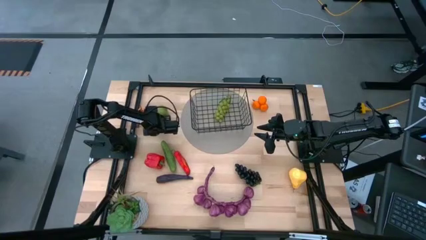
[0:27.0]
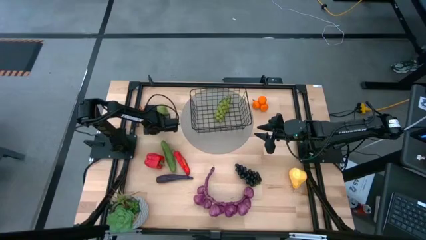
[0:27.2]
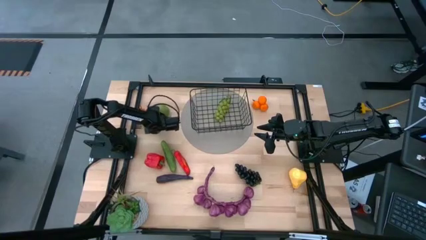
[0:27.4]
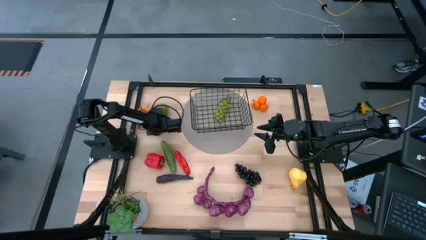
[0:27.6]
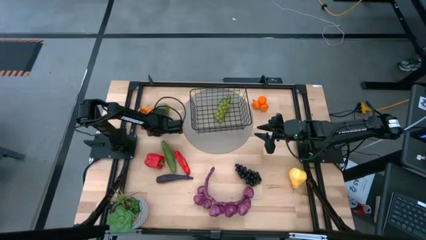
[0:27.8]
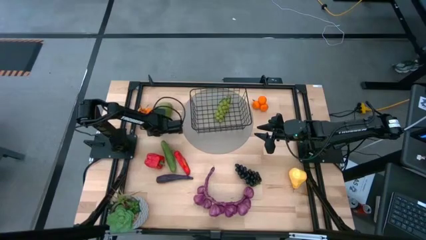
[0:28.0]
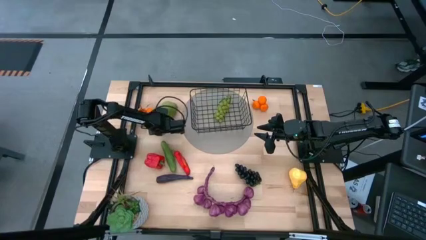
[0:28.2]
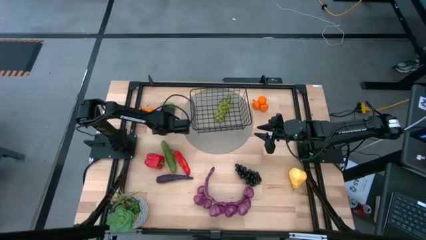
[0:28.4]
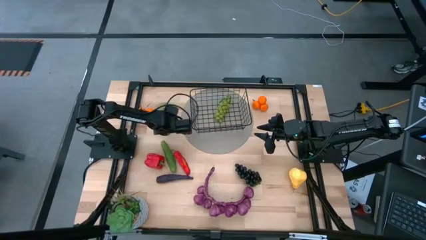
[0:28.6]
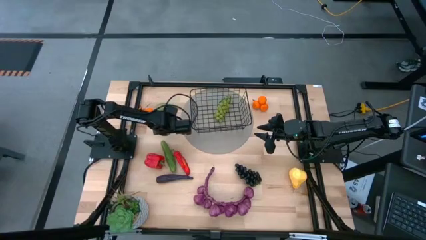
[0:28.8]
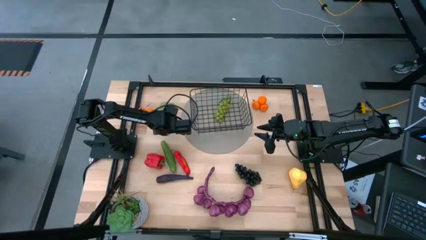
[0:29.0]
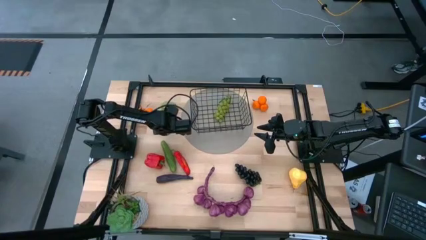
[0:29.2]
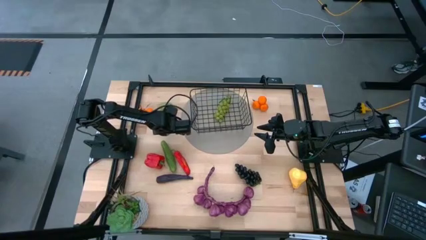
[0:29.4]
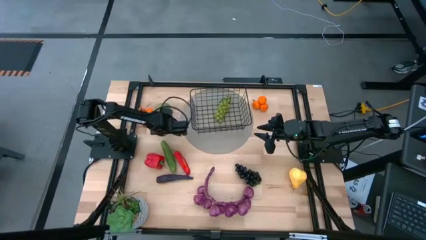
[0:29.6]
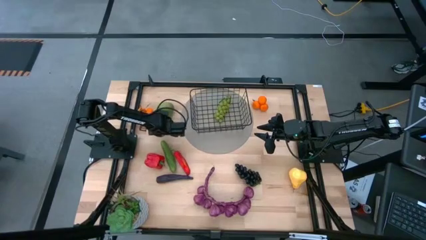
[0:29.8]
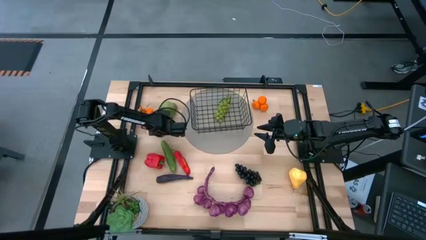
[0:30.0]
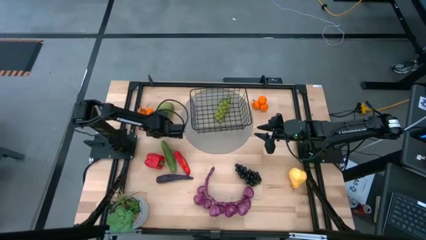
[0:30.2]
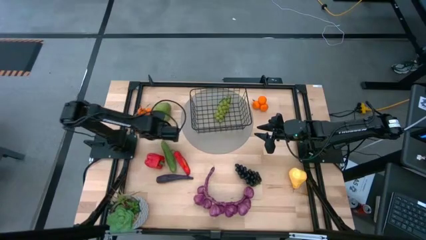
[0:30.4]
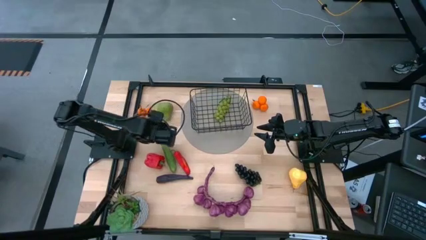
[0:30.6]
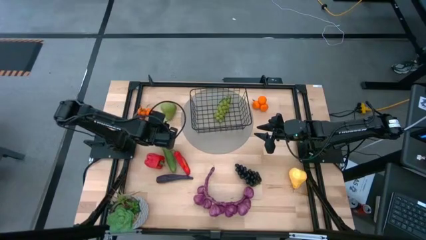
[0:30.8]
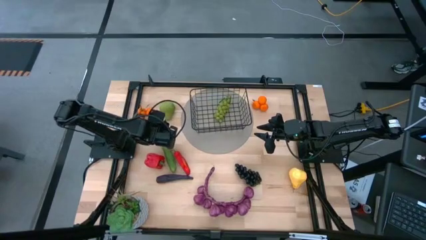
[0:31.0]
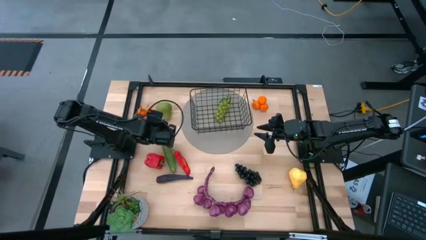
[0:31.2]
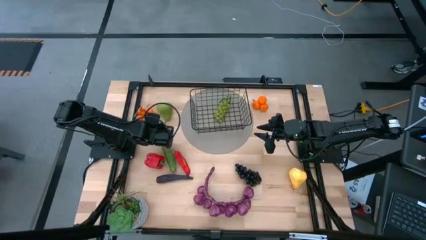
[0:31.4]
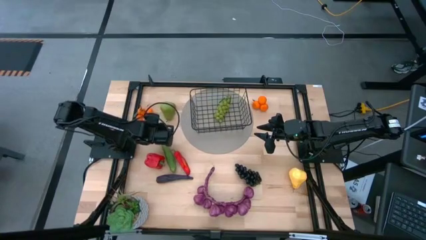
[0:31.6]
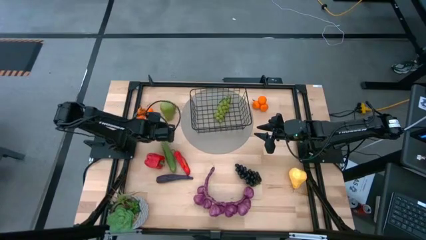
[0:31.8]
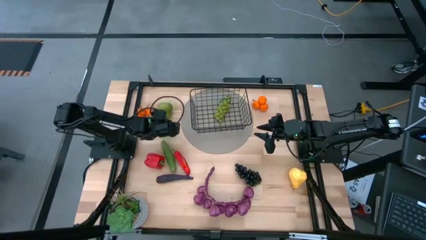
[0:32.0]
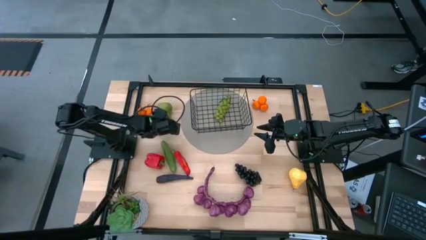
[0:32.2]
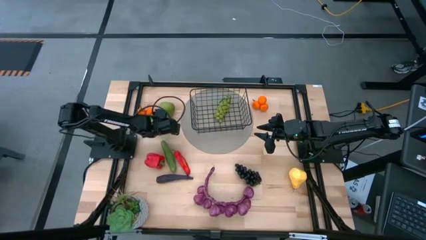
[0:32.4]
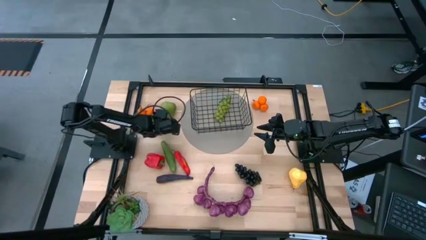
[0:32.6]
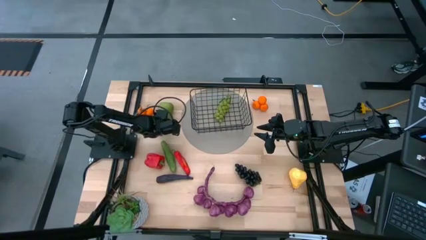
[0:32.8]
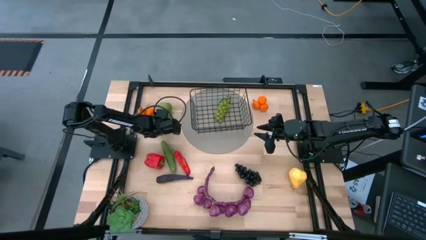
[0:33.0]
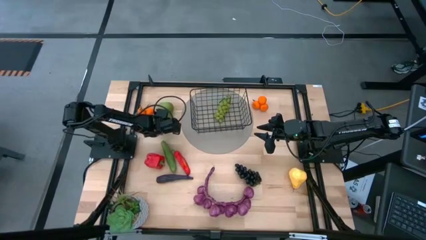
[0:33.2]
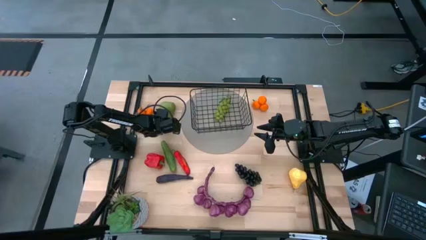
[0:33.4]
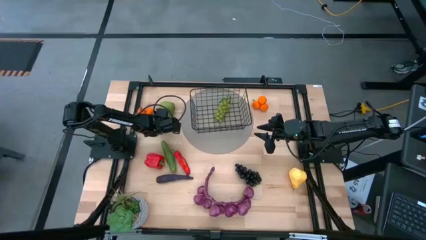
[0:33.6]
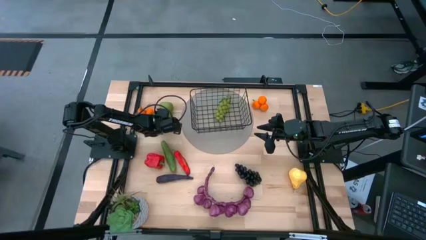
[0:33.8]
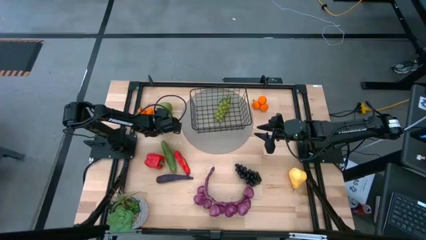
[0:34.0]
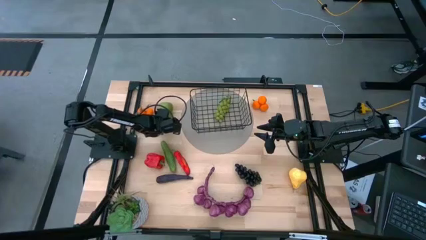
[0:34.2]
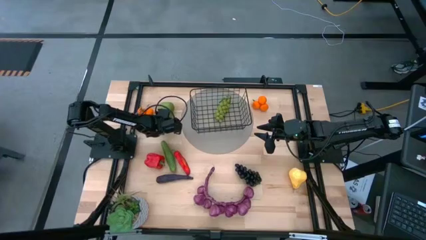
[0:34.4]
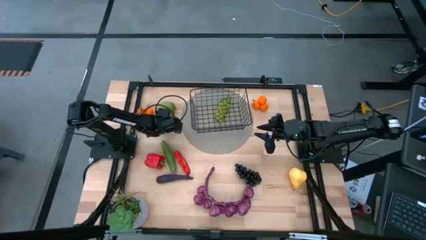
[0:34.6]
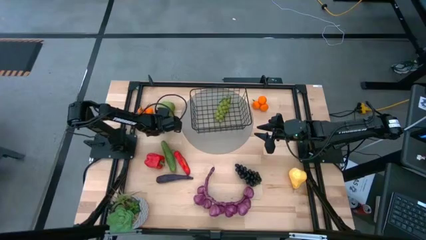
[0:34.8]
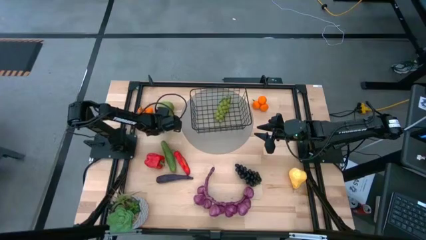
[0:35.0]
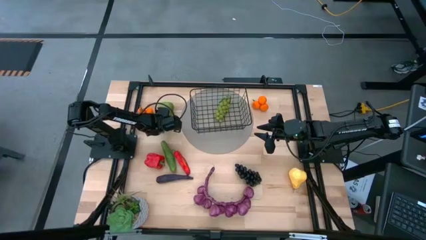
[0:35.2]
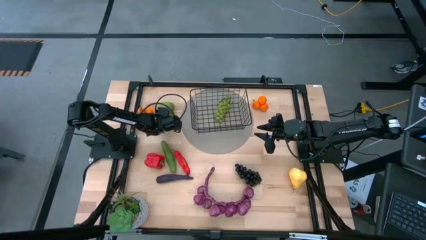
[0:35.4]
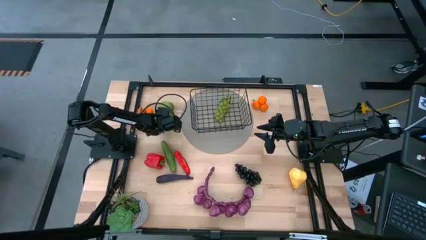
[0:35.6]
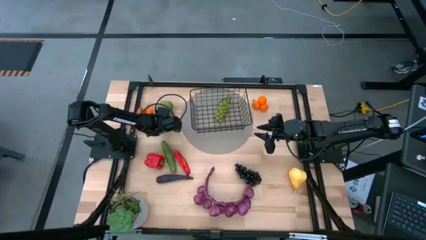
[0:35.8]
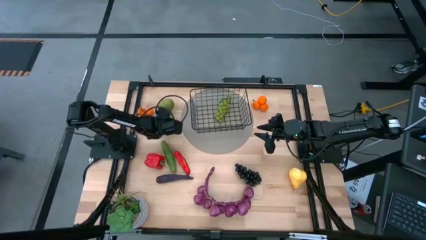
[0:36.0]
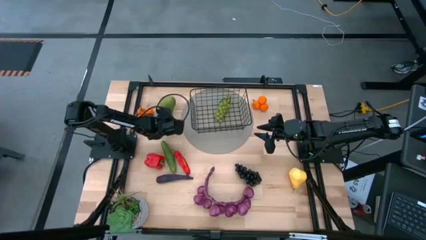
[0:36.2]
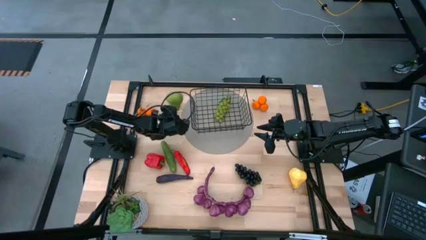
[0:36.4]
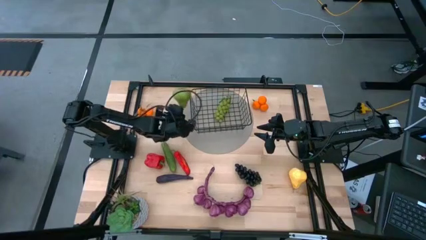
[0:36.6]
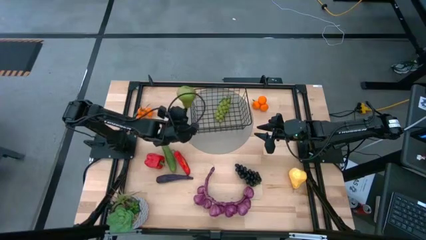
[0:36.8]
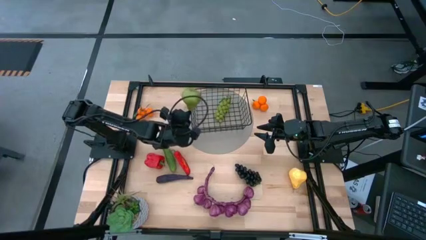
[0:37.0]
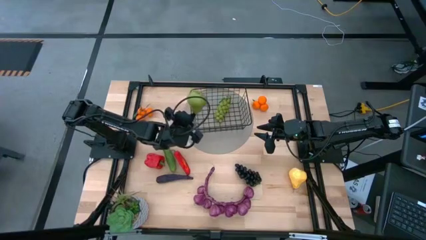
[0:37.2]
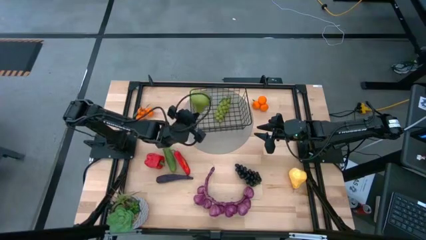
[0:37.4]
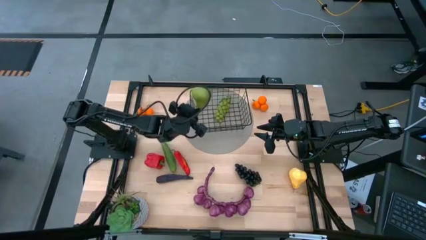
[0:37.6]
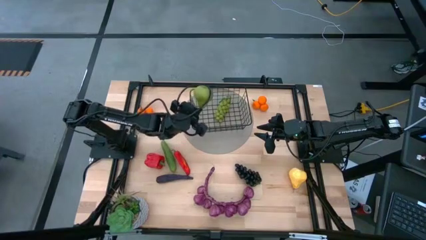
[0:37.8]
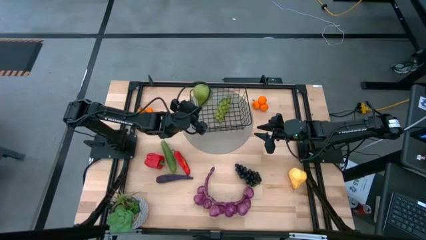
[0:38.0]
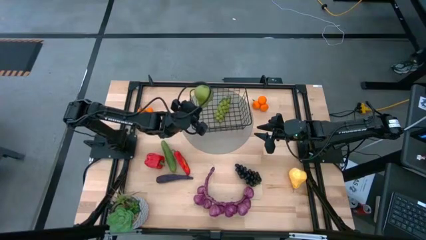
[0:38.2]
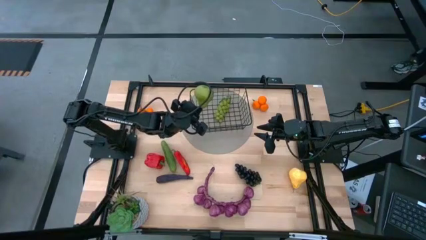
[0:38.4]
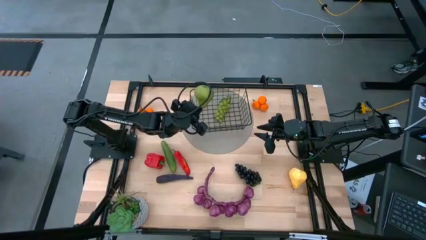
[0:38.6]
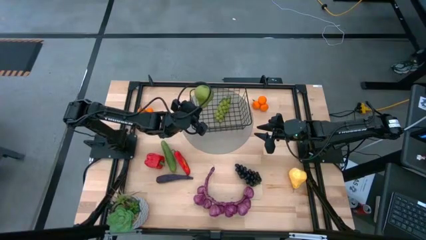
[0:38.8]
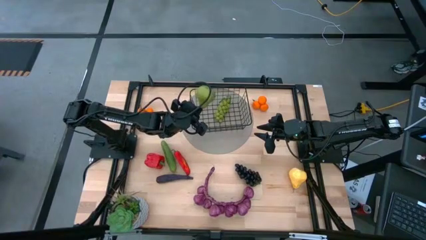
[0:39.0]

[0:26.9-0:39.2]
Task: Build produce basket
Put the green pear into the black wire basket

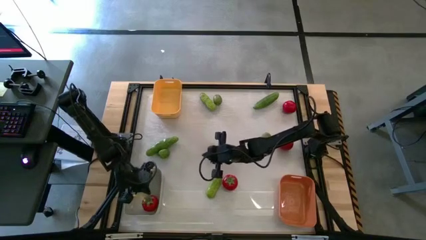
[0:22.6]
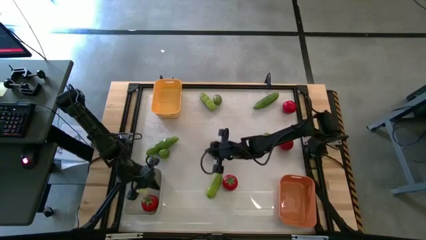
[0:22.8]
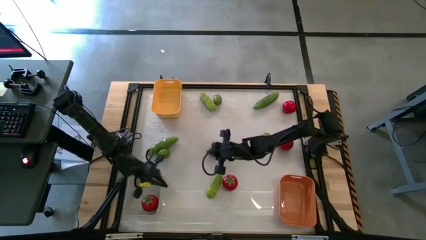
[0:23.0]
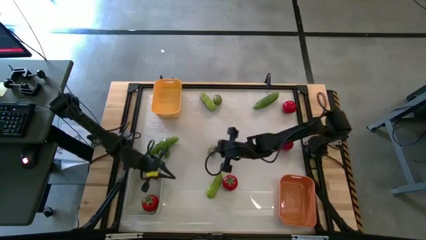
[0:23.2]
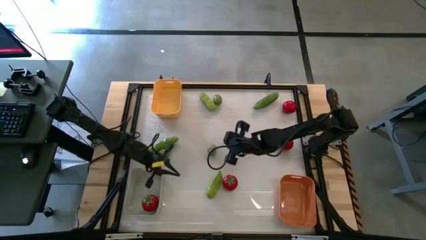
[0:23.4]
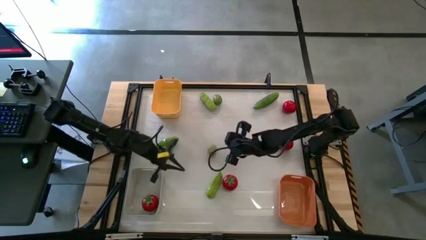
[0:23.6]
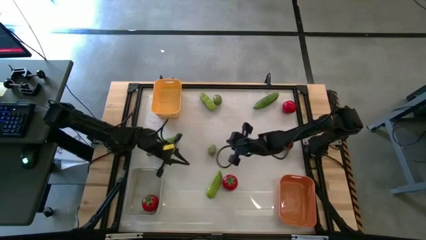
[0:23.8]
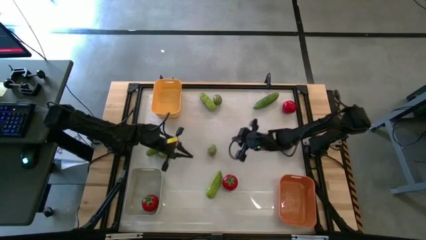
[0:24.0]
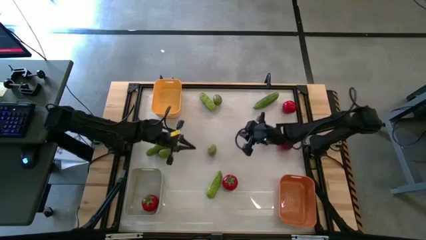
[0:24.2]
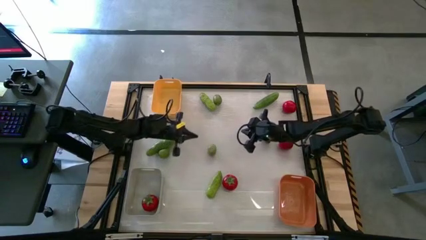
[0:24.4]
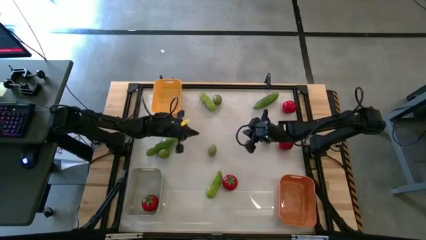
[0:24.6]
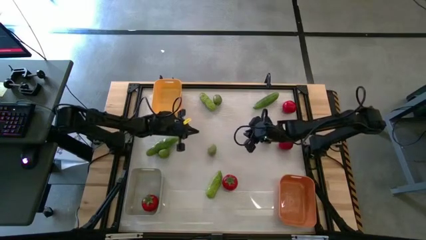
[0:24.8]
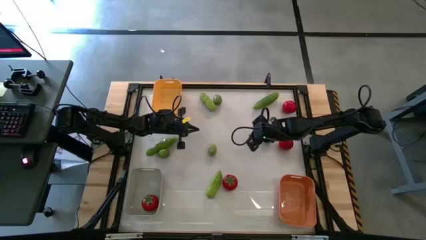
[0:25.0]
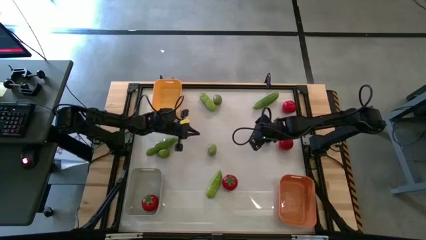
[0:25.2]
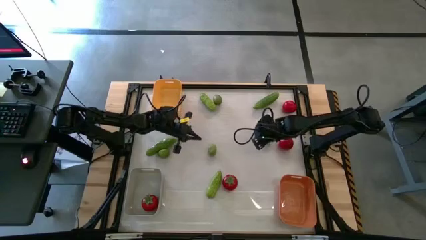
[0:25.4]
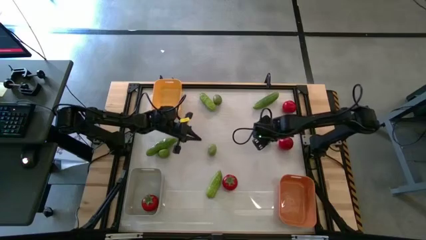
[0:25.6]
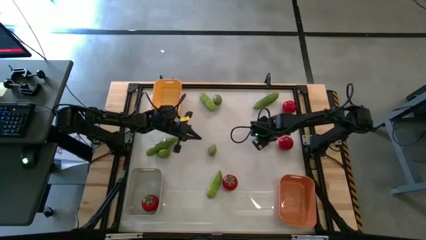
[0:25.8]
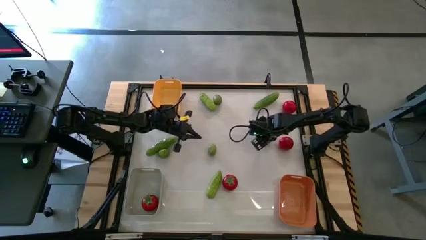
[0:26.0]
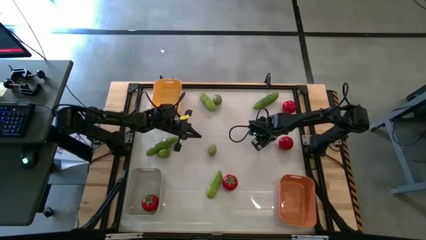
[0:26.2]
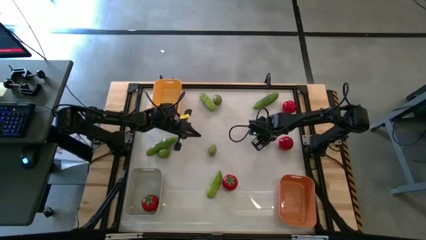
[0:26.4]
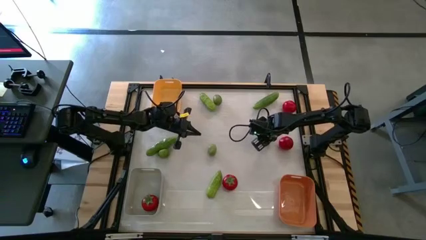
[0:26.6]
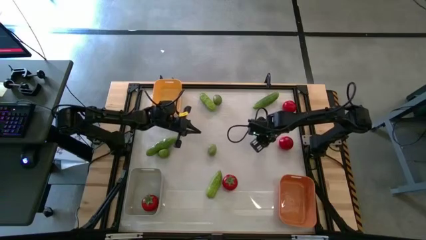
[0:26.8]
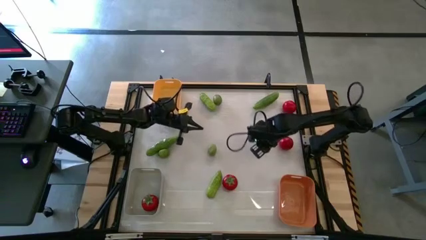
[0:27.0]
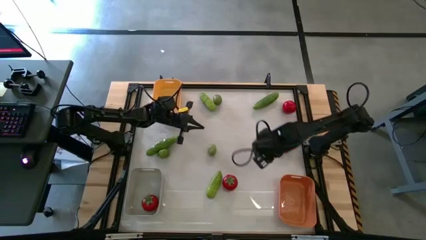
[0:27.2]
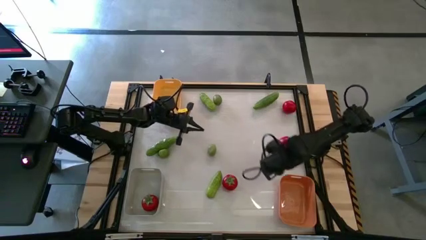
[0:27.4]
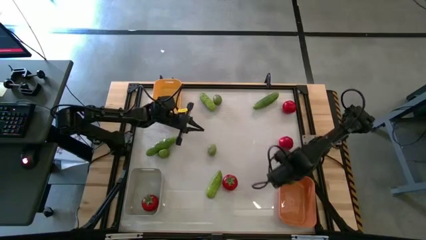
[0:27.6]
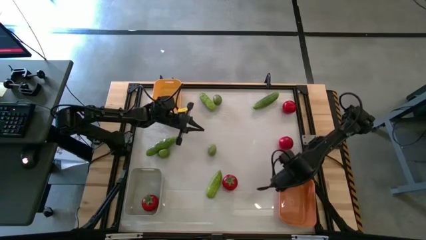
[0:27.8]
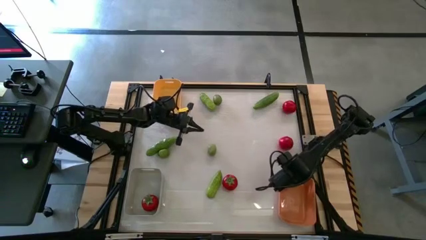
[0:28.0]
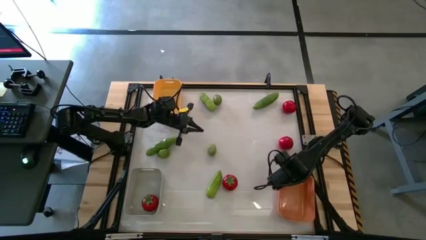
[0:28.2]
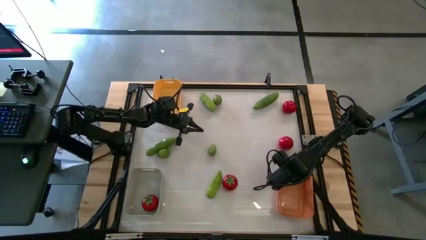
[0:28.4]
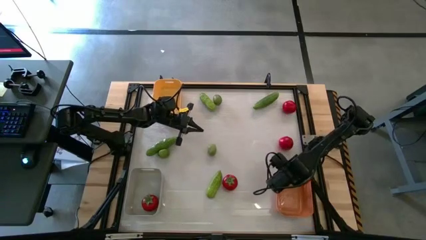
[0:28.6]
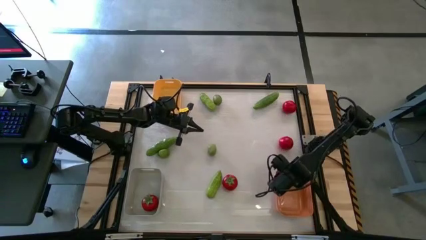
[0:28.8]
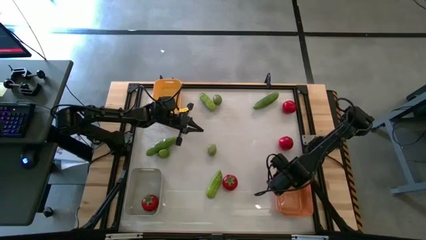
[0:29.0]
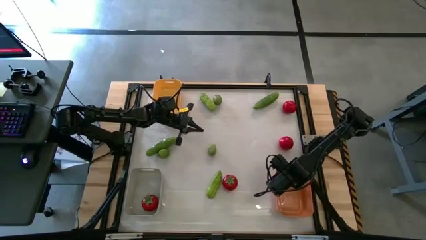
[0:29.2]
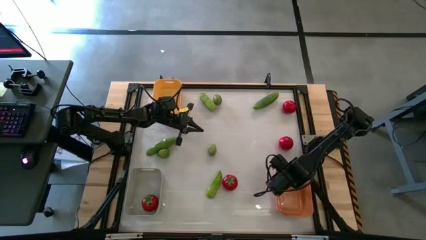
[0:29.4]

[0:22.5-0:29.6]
Task: Sort produce into baskets
Put the green lime into the orange bin
